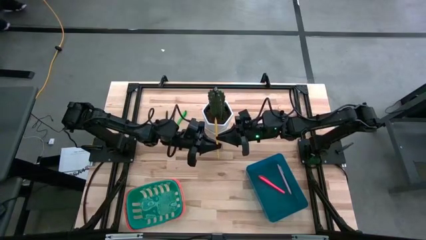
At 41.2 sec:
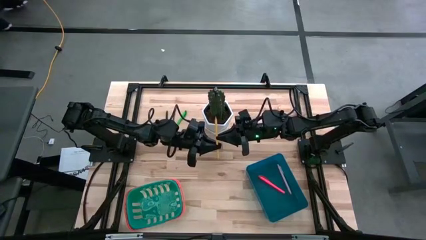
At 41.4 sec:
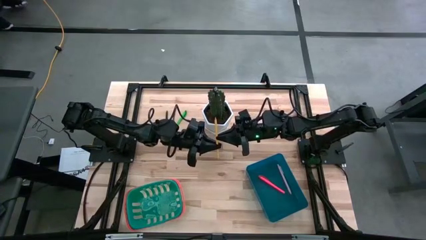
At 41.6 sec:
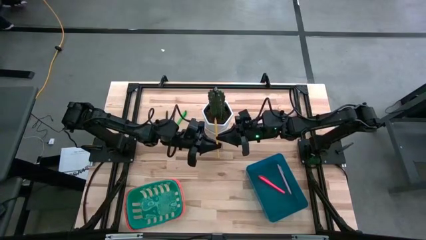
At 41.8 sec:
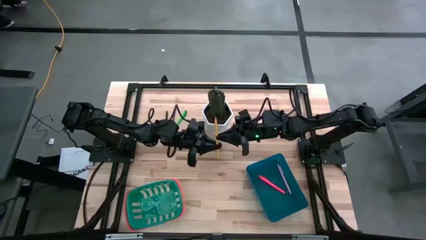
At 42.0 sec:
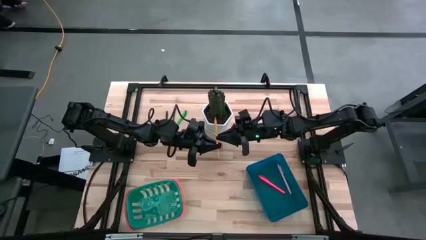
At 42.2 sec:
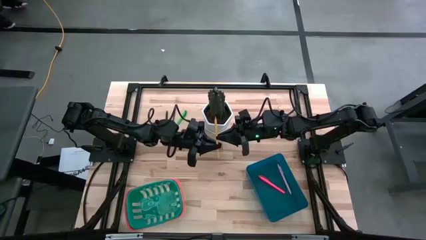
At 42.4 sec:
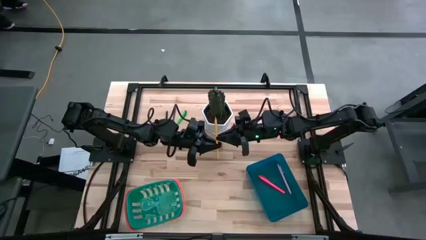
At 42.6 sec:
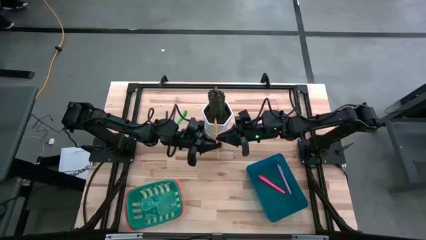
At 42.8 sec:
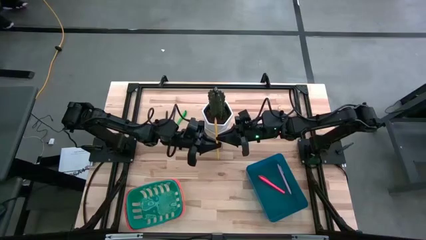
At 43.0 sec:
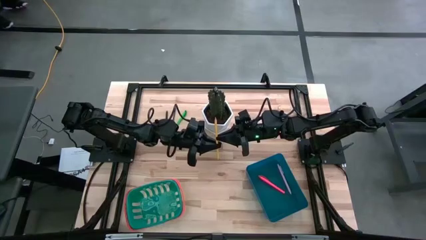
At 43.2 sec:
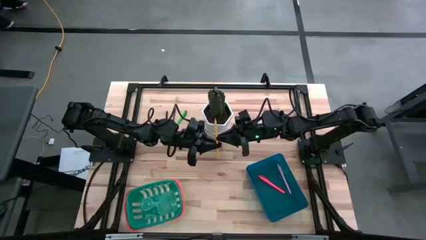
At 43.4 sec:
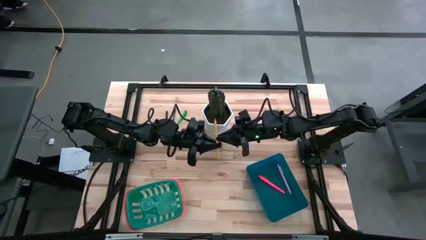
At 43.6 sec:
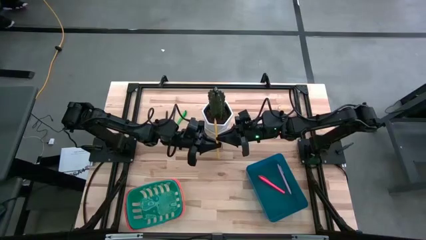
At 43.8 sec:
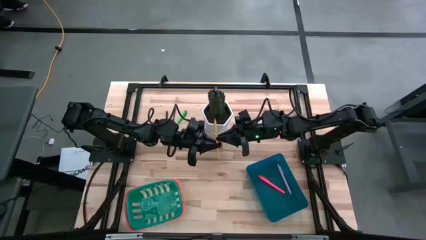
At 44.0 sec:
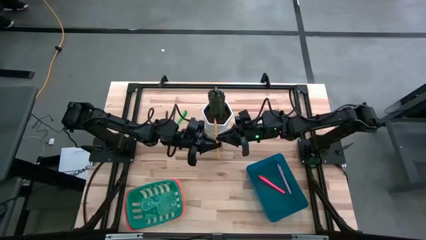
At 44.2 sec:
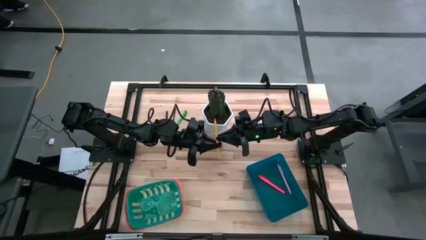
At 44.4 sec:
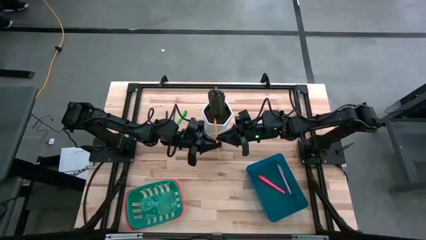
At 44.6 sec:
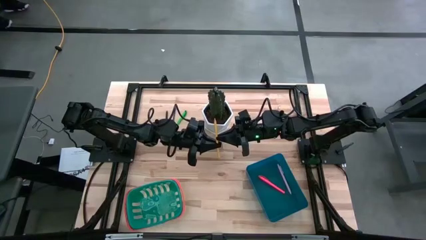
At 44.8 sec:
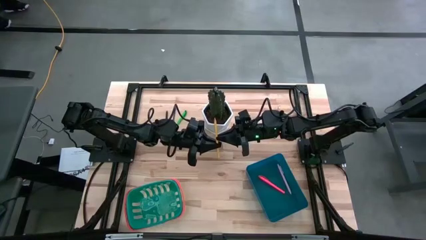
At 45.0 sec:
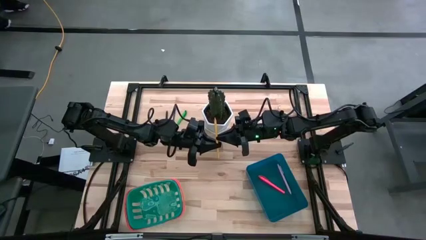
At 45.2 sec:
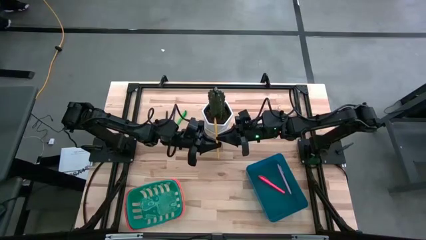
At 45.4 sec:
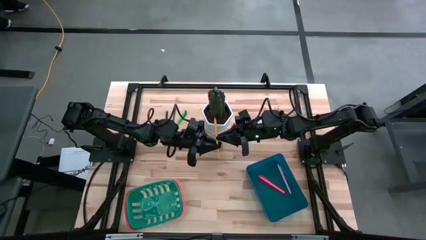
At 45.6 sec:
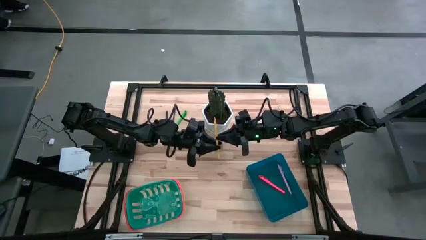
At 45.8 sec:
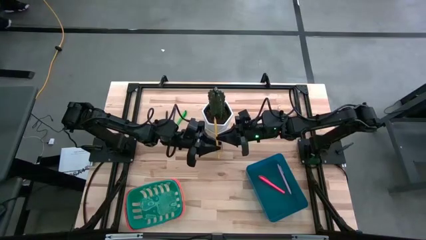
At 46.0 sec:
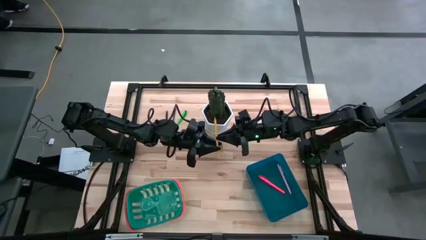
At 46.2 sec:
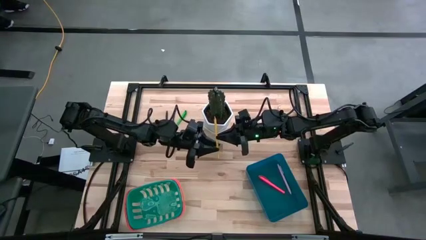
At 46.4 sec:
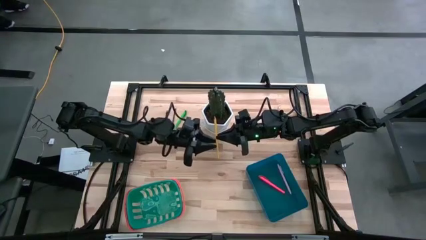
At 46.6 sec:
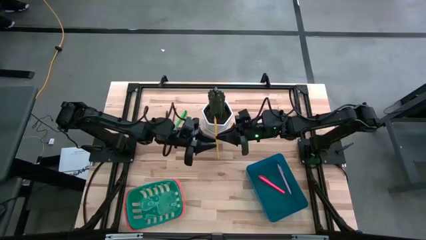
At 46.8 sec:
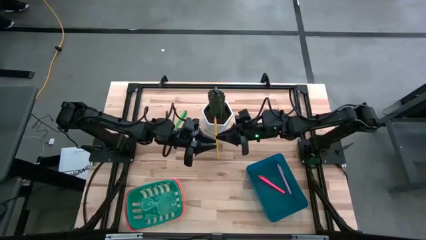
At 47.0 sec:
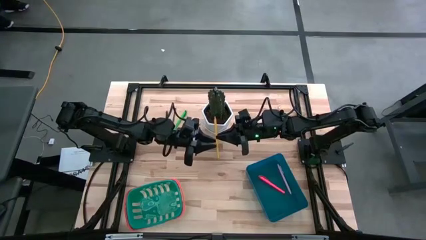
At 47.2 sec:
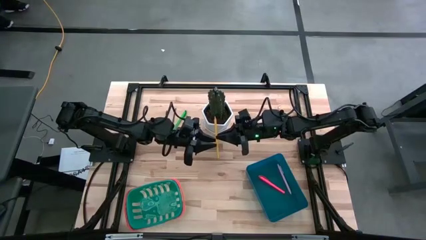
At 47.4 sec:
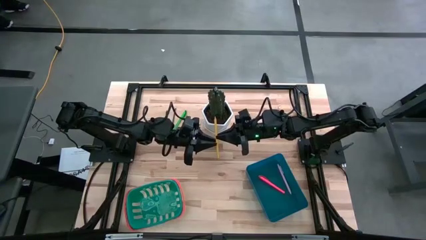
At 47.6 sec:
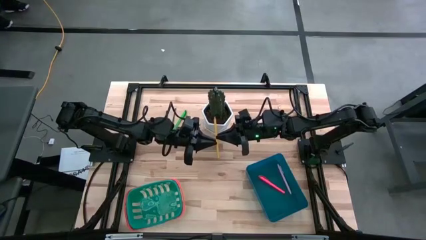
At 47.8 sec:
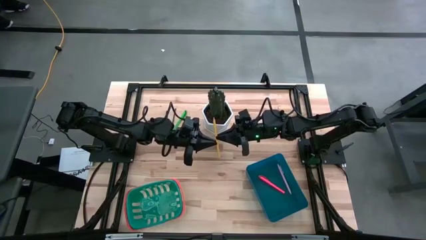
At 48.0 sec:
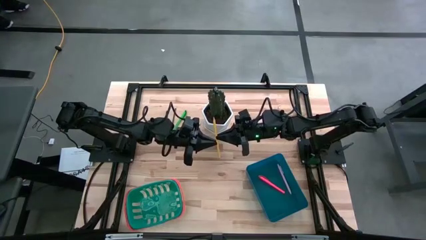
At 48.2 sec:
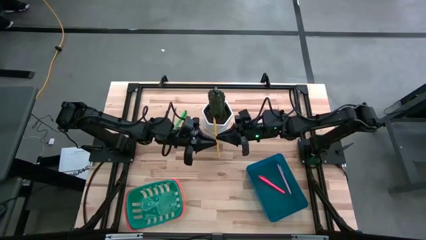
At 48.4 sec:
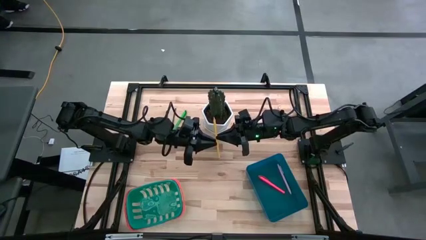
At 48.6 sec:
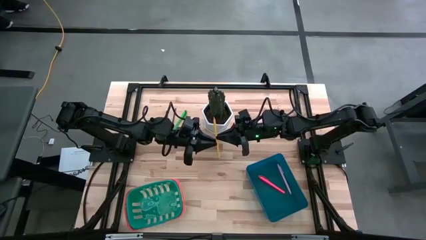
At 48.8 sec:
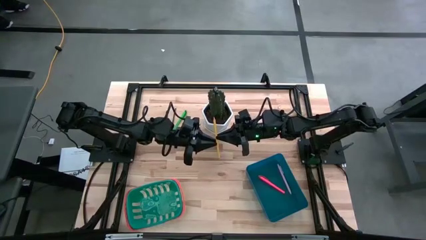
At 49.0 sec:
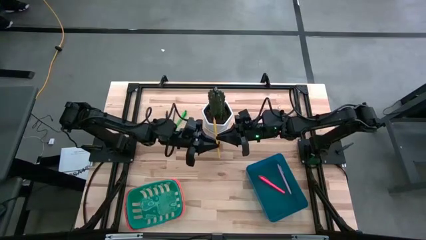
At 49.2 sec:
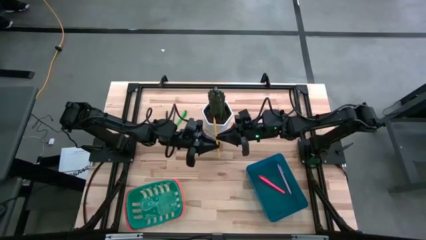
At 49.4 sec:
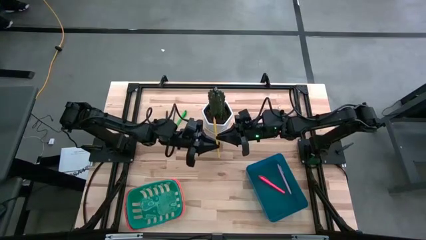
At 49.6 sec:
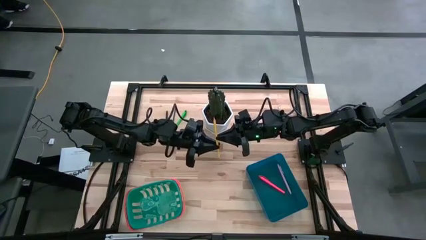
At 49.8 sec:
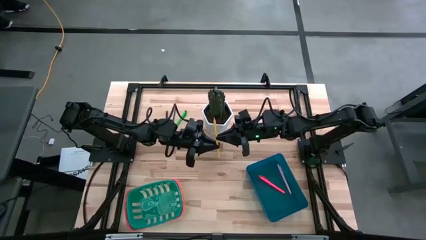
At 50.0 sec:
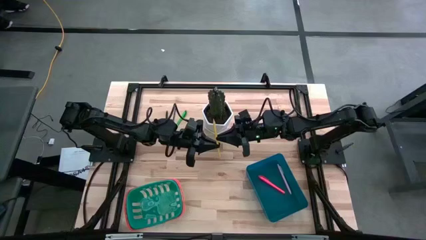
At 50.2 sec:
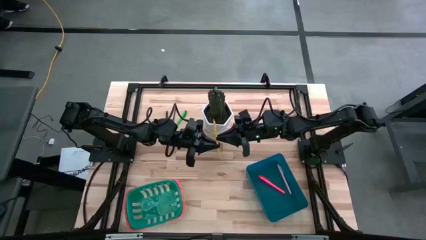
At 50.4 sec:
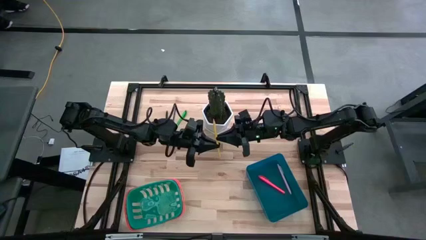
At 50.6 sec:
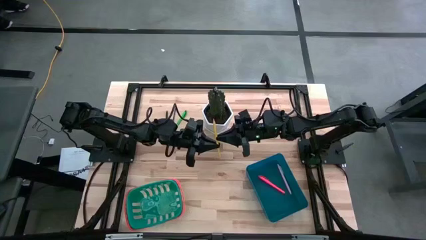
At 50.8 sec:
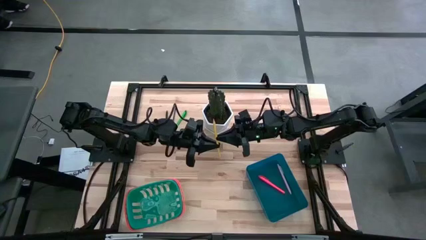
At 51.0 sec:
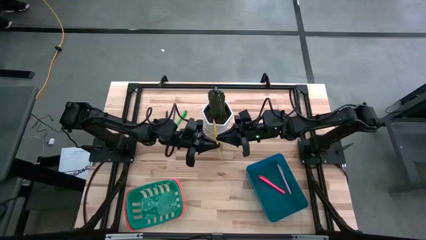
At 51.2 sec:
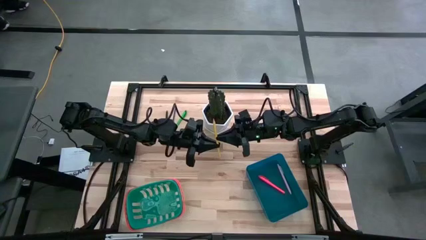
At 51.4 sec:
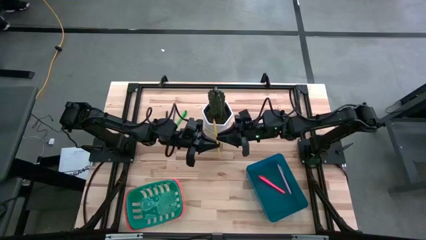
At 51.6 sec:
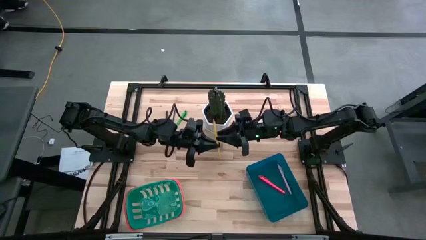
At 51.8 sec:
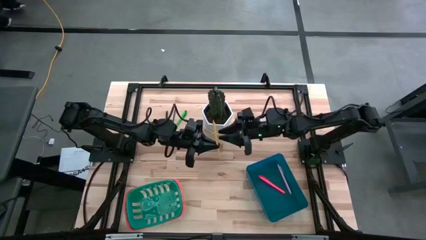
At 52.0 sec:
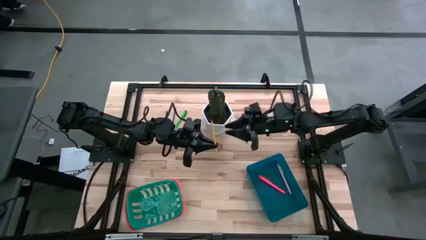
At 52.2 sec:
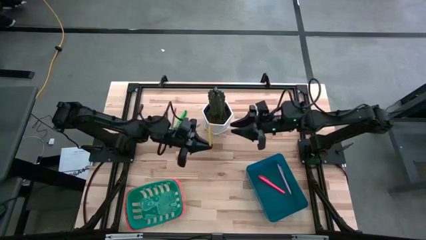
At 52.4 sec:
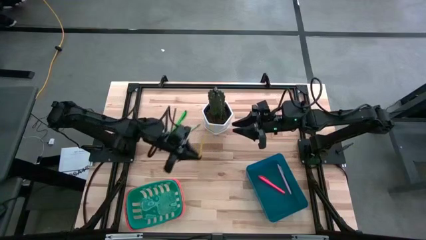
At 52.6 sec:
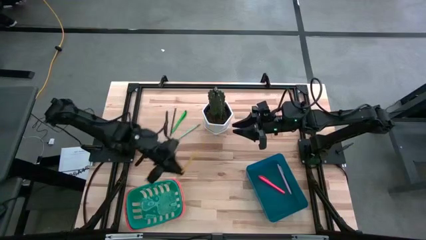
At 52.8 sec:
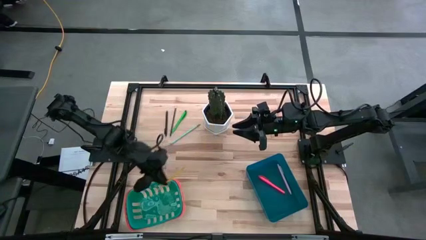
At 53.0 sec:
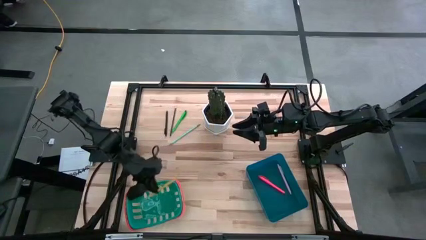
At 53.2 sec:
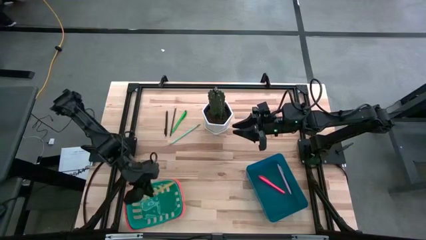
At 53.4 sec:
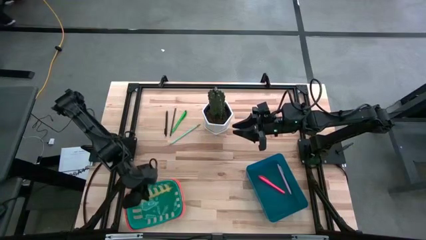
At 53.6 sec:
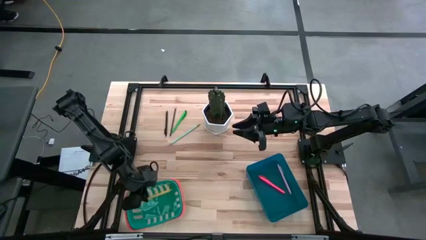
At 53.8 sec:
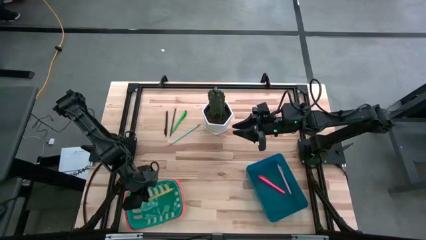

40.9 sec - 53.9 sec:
Task: Sort pens & pencils
Put the yellow pencil into the green bin
